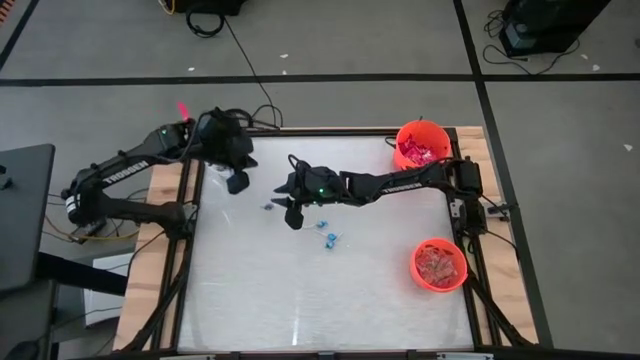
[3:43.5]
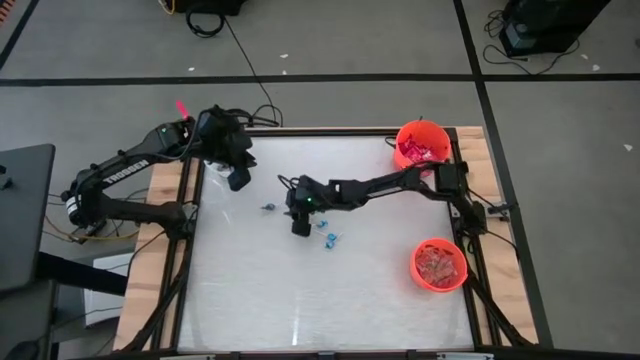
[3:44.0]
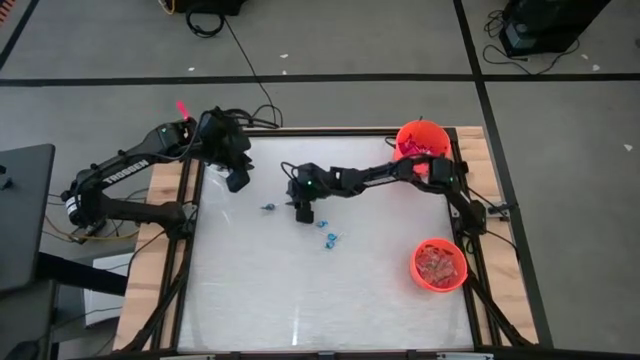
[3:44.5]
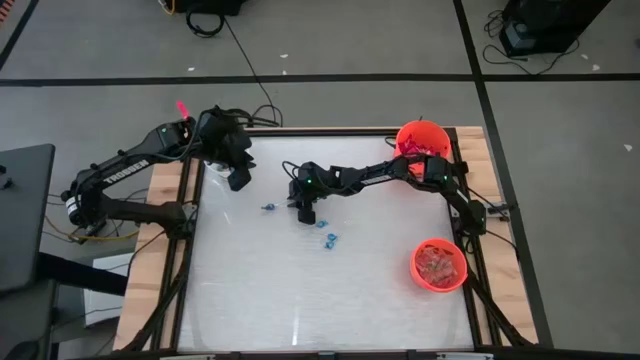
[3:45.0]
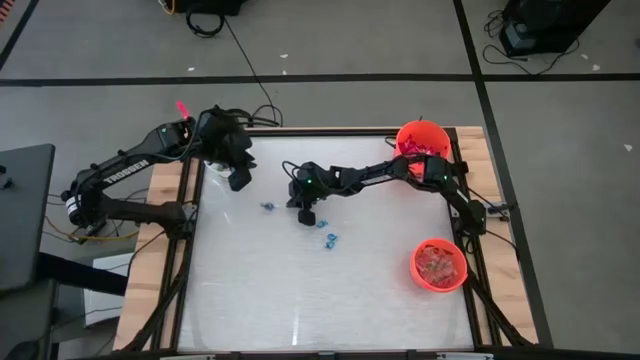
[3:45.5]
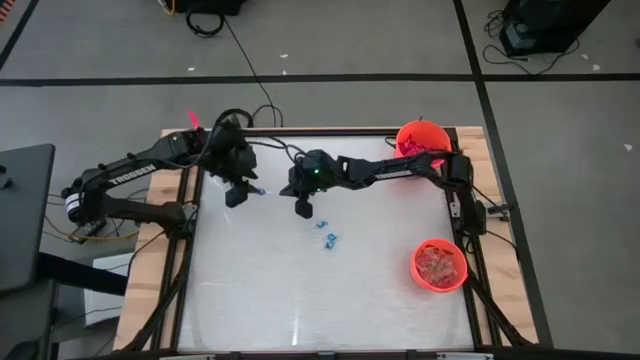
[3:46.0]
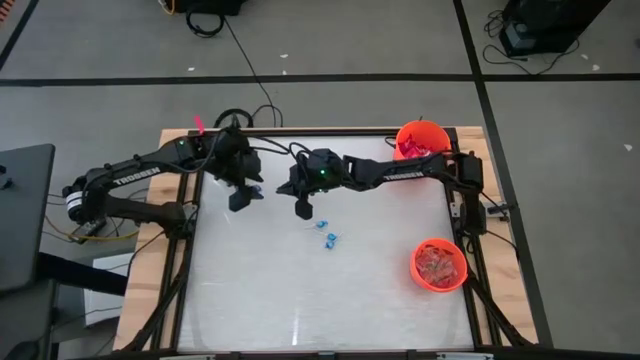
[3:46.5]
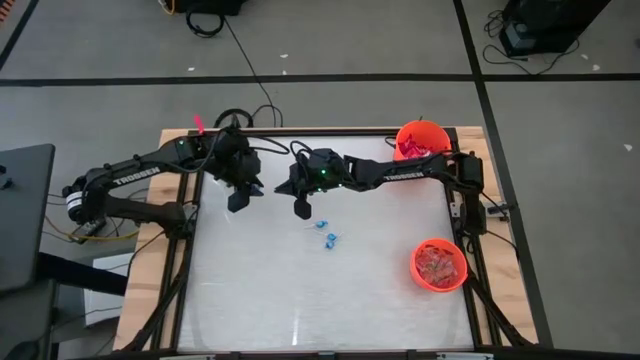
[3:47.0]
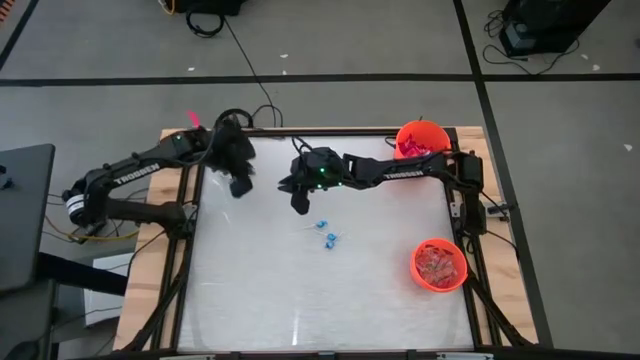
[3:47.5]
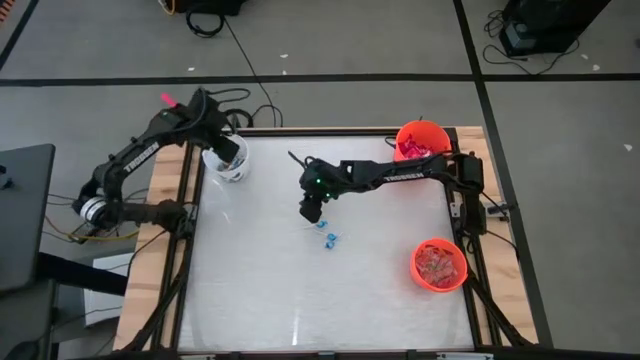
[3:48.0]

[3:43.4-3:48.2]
Task: Sort candy by brand, put in halloween buckets
Put the blue candy into the white bucket

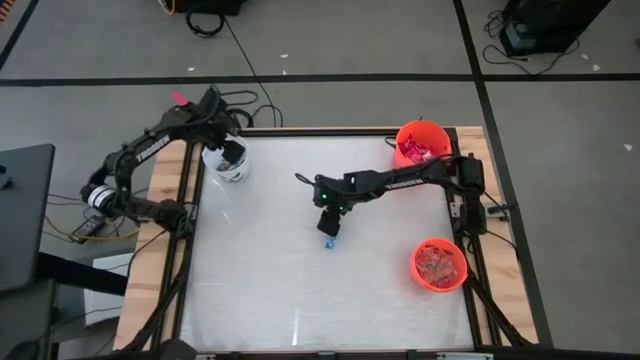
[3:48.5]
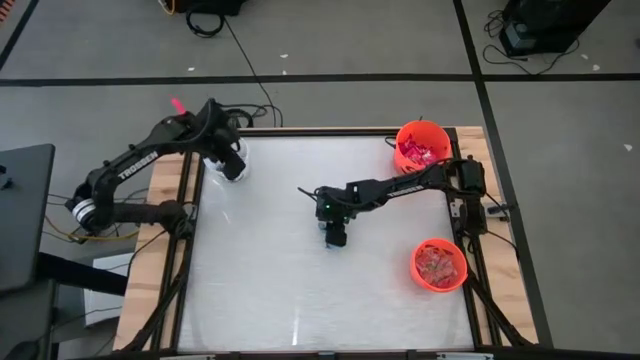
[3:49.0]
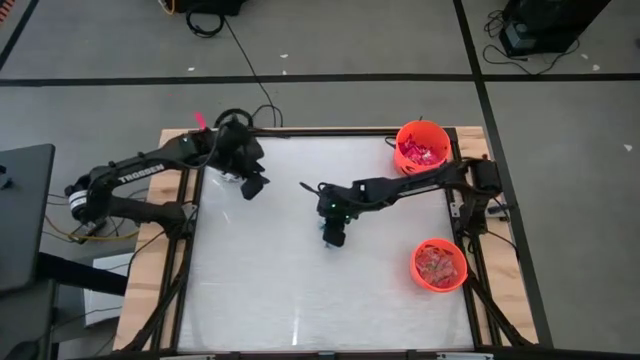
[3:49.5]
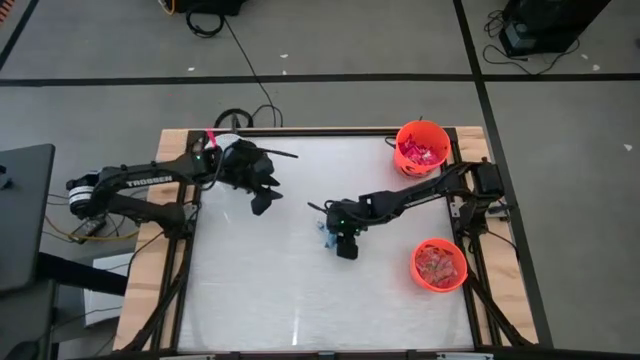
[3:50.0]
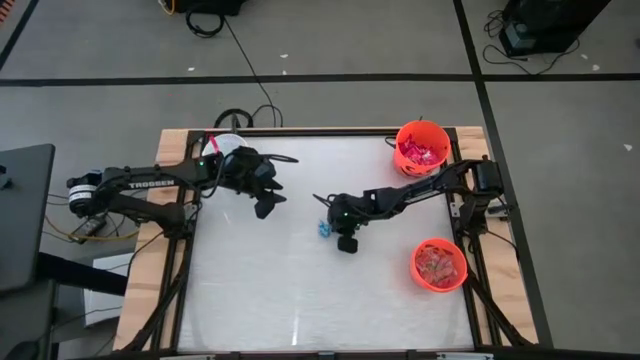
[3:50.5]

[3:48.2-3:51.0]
Put the blue candy into the white bucket

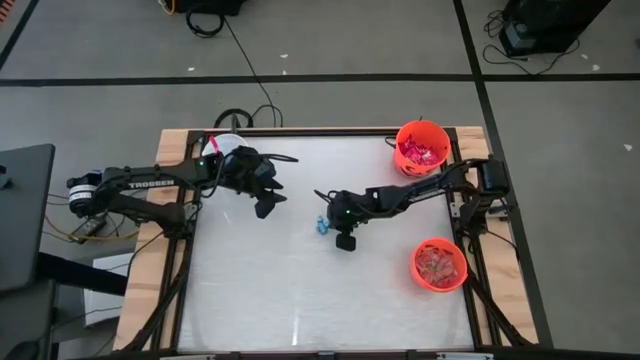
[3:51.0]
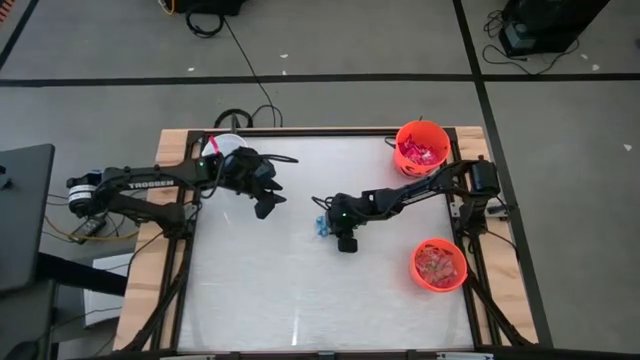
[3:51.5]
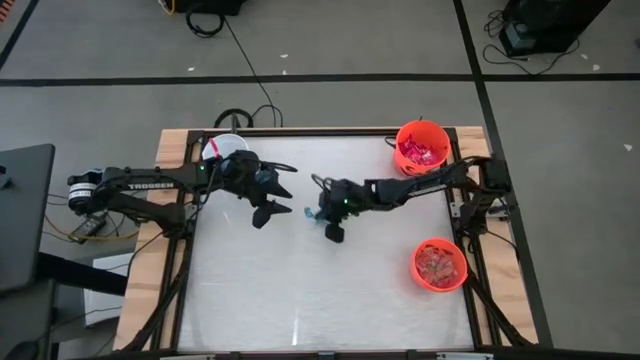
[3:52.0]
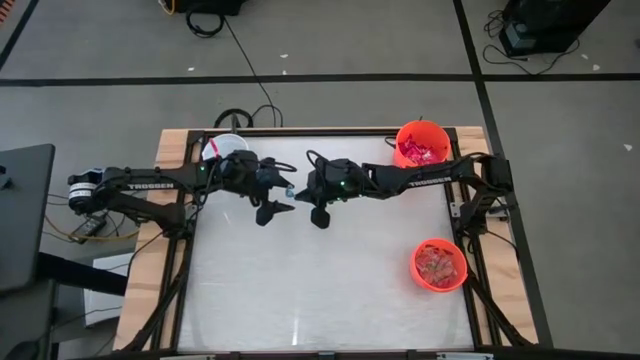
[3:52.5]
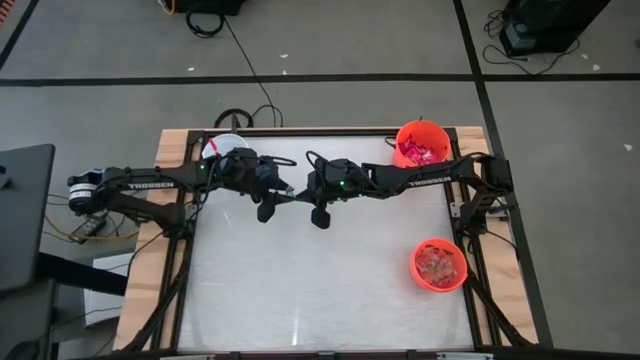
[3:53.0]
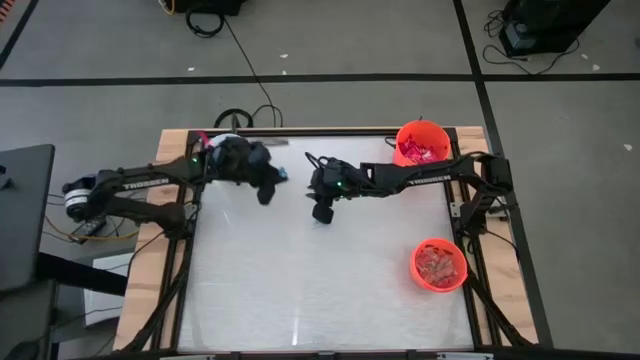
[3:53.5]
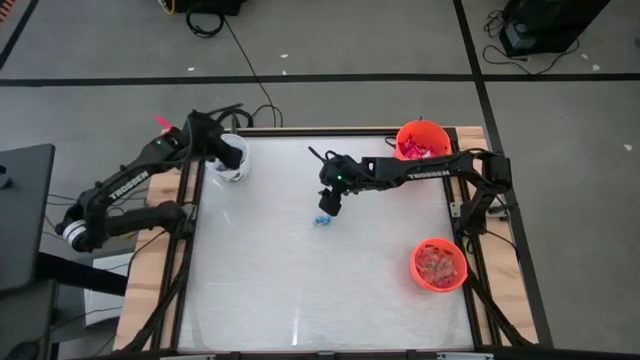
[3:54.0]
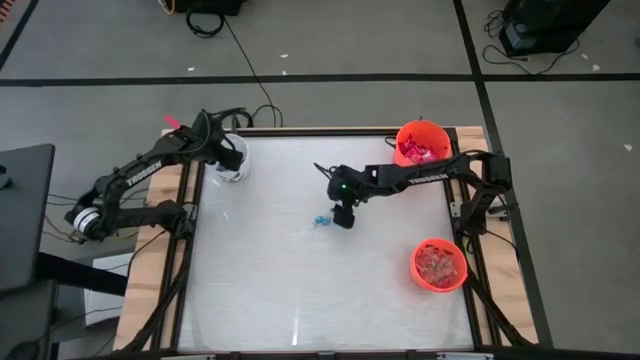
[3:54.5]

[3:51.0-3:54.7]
Put the blue candy into the white bucket

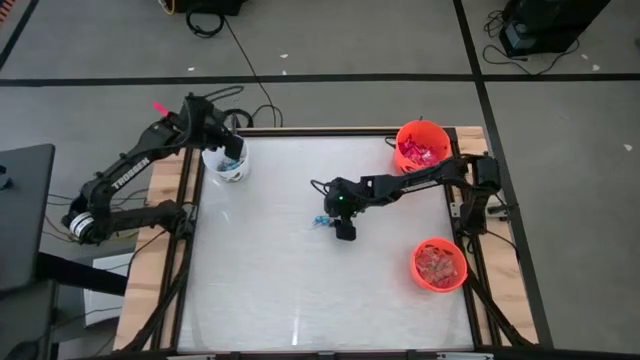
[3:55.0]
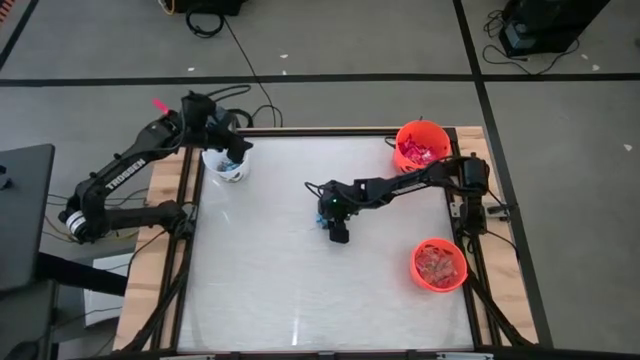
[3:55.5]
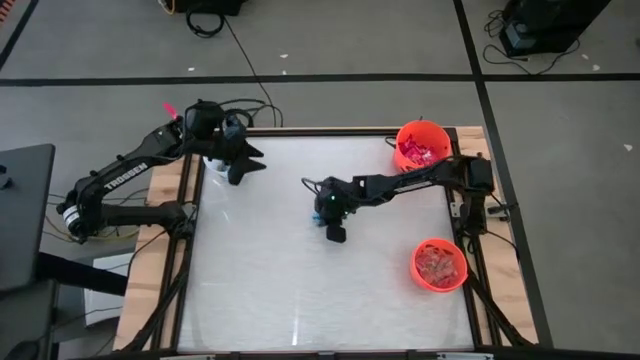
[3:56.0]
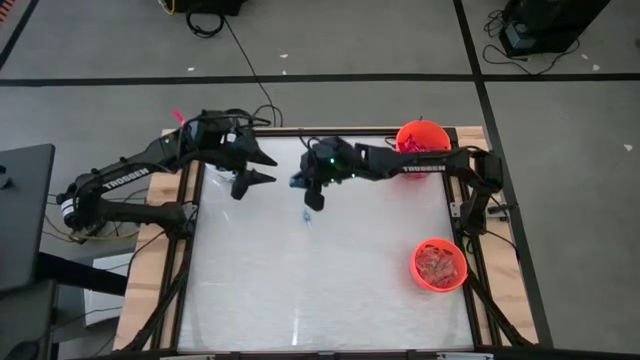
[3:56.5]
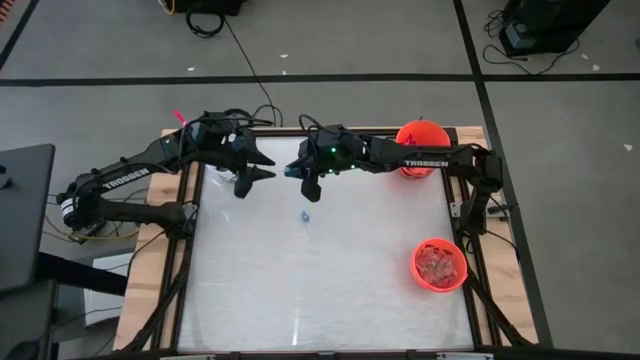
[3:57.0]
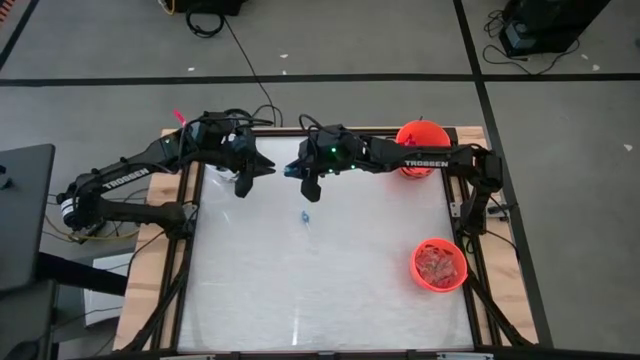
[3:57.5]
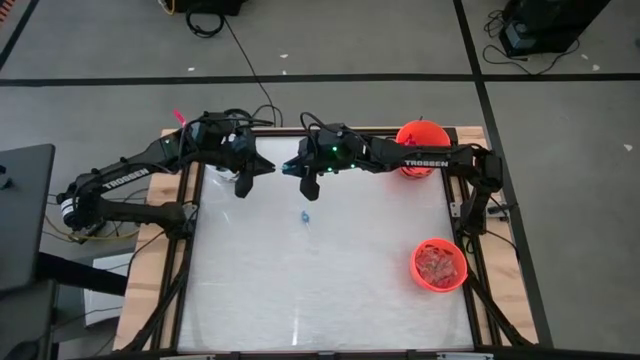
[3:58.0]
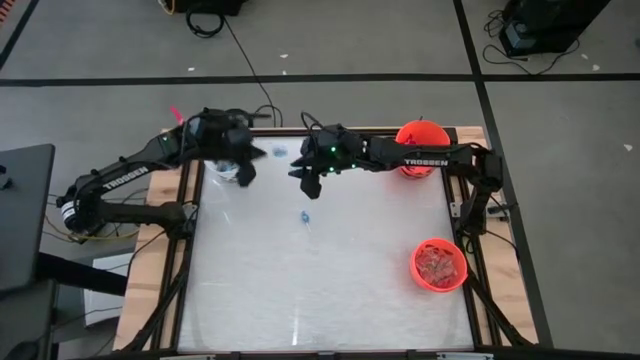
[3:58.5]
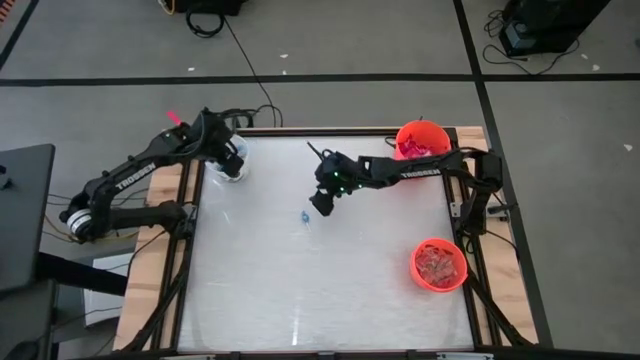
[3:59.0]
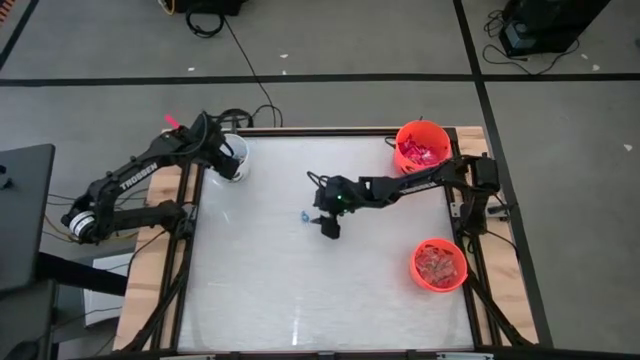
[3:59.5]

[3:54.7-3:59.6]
Put the blue candy into the white bucket

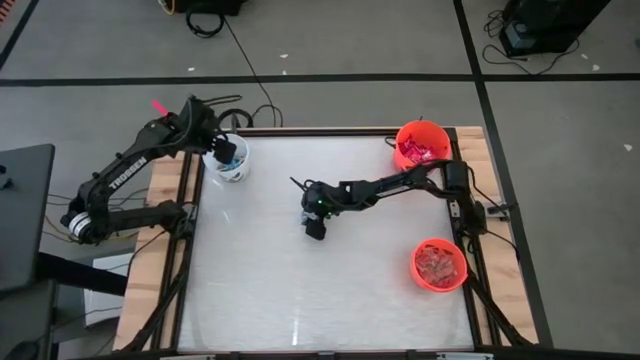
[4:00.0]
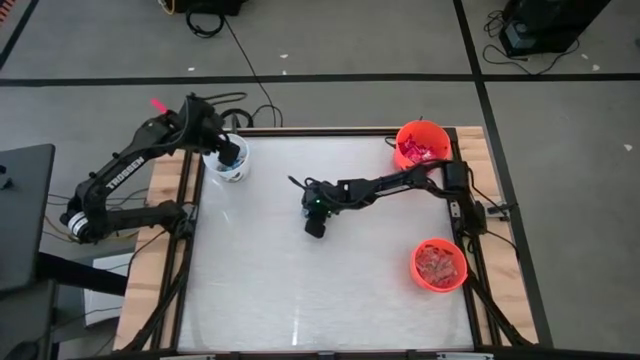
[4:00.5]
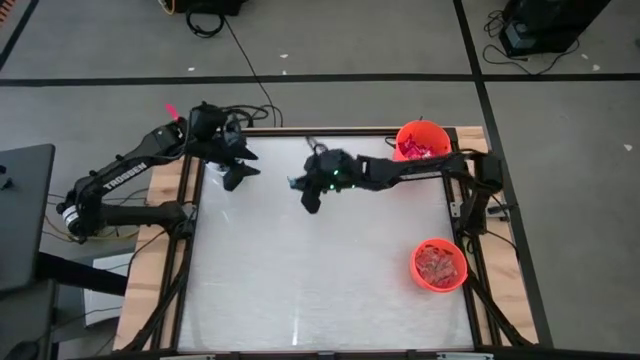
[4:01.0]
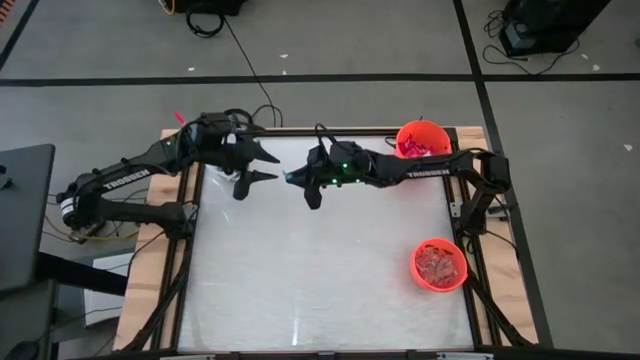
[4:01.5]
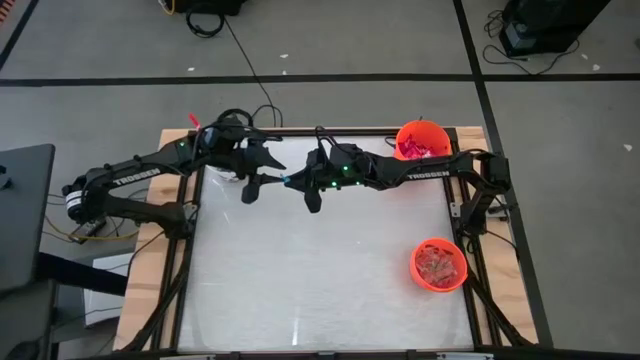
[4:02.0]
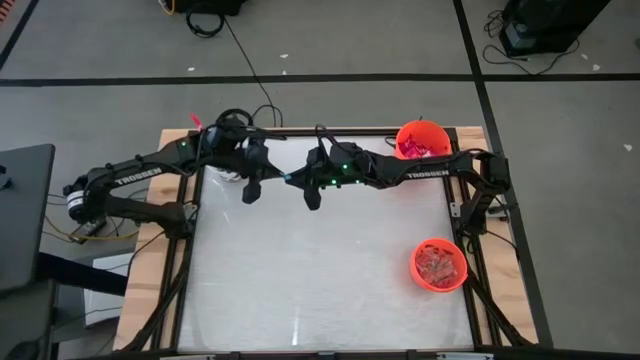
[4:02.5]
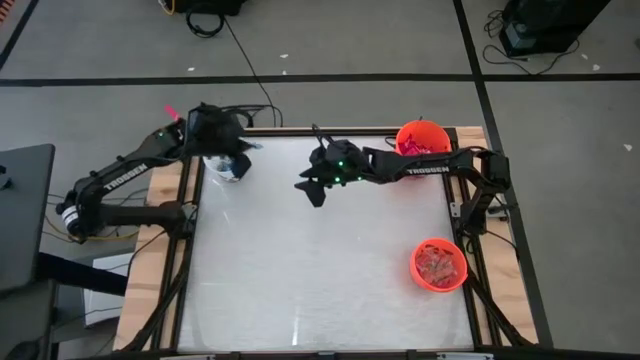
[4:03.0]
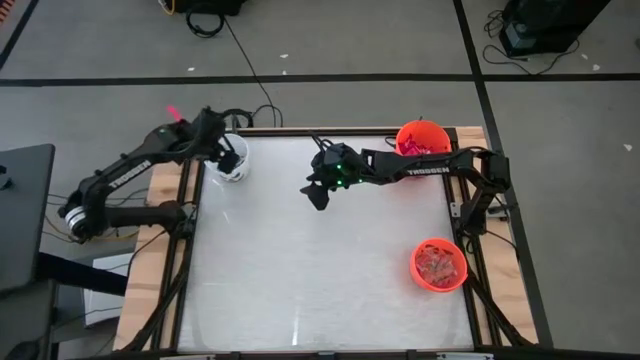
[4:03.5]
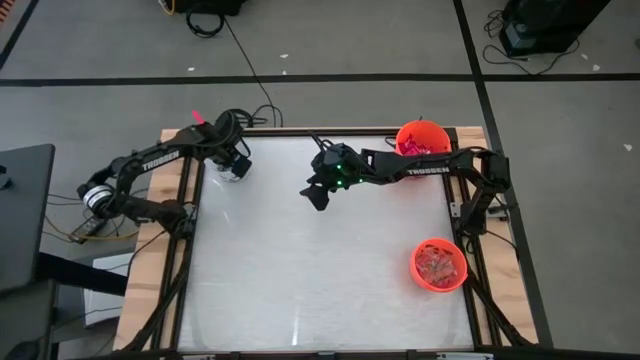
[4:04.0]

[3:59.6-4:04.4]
Put the blue candy into the white bucket
